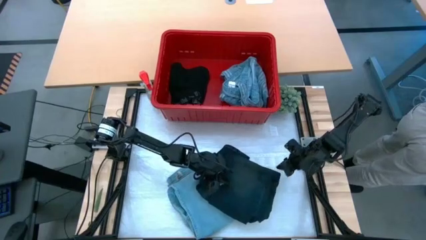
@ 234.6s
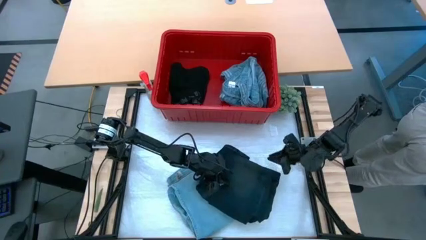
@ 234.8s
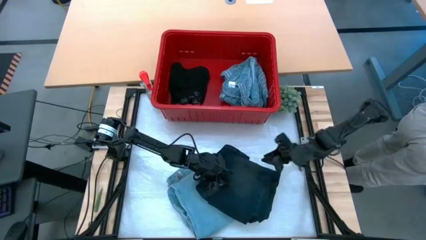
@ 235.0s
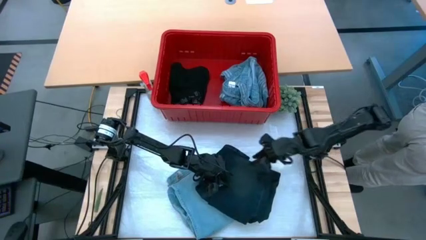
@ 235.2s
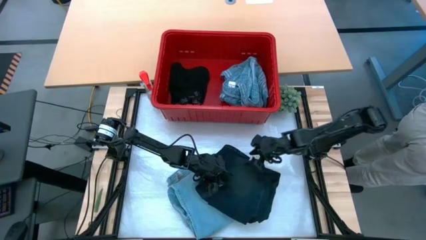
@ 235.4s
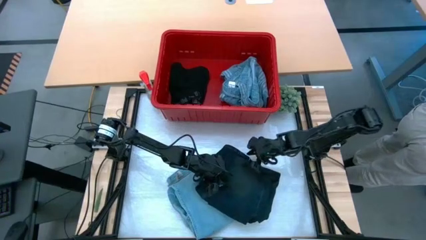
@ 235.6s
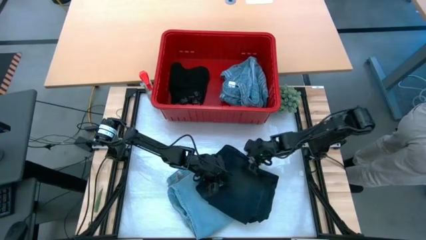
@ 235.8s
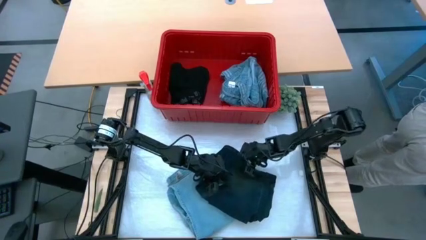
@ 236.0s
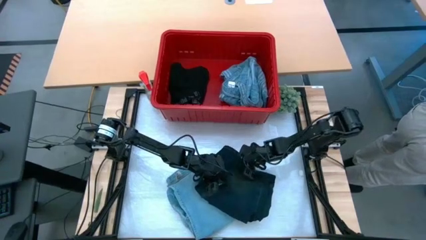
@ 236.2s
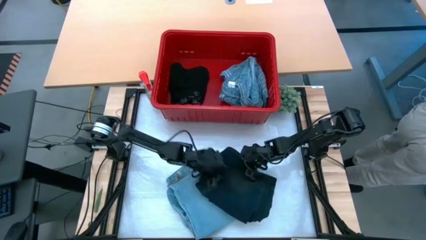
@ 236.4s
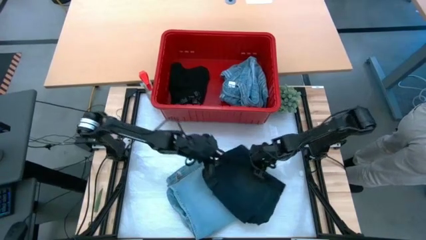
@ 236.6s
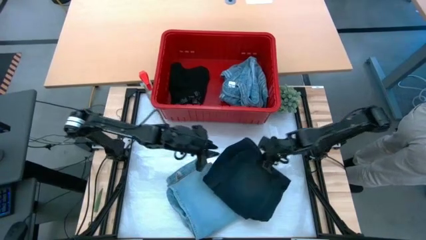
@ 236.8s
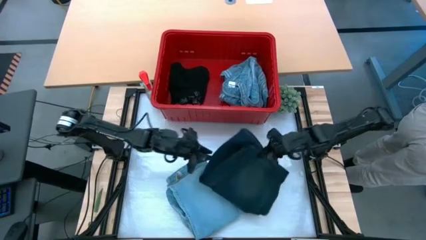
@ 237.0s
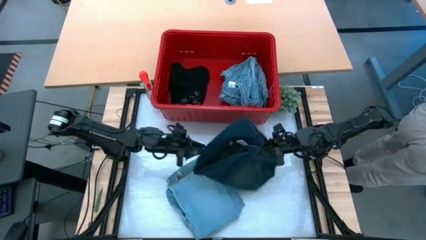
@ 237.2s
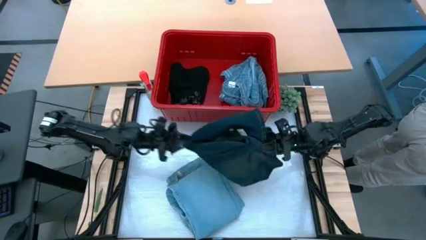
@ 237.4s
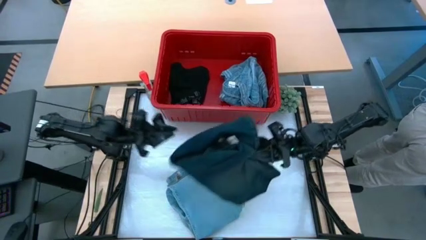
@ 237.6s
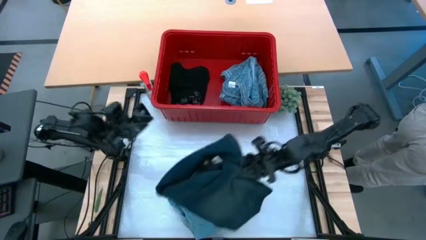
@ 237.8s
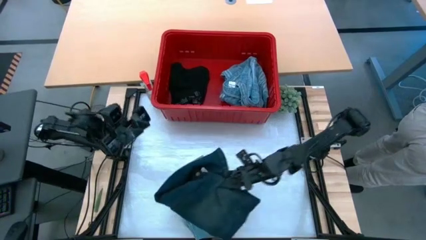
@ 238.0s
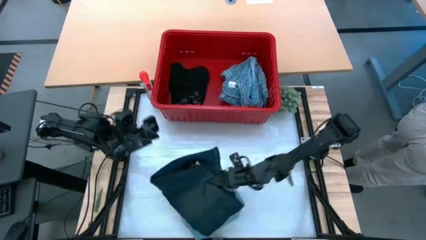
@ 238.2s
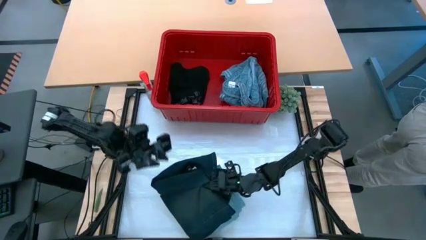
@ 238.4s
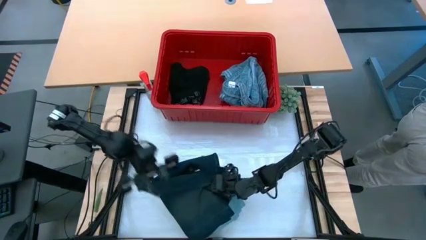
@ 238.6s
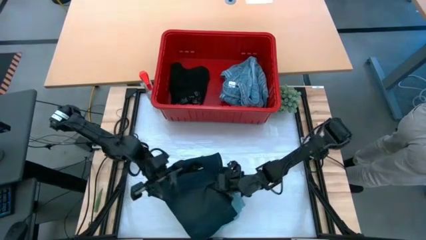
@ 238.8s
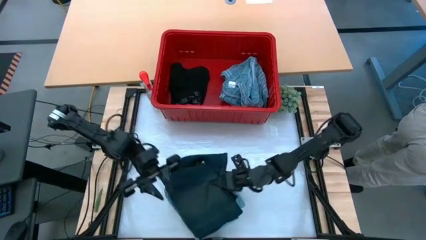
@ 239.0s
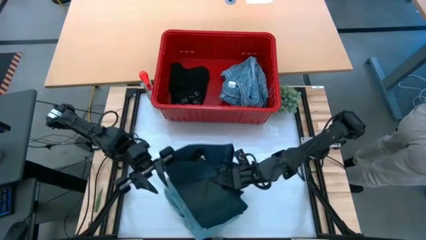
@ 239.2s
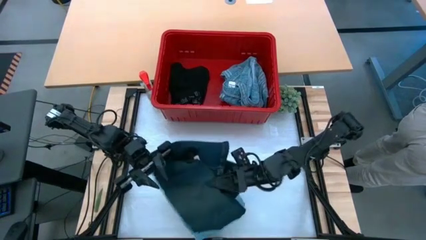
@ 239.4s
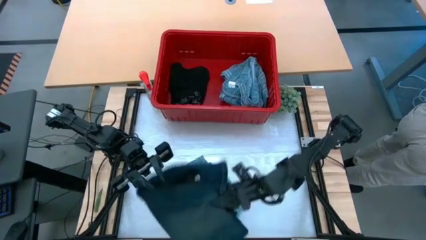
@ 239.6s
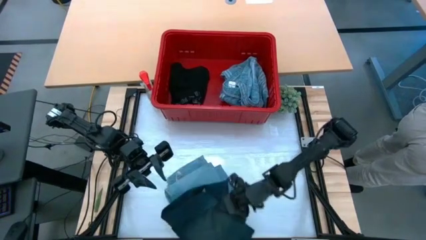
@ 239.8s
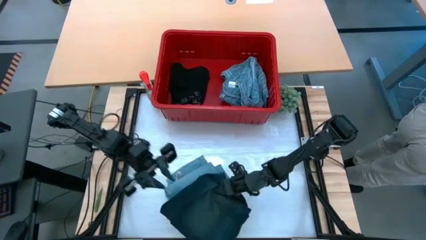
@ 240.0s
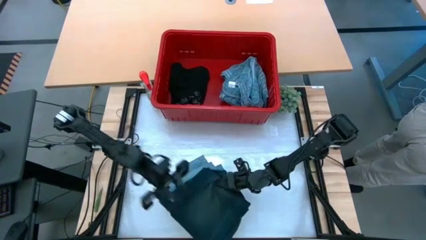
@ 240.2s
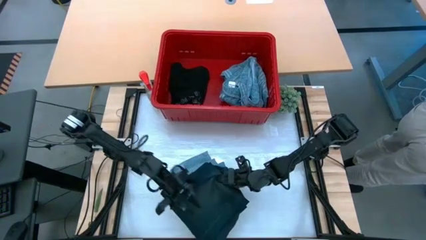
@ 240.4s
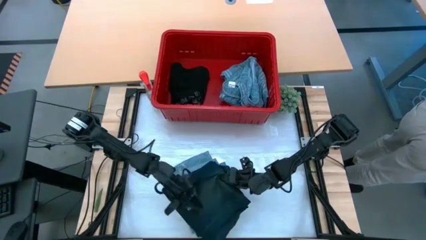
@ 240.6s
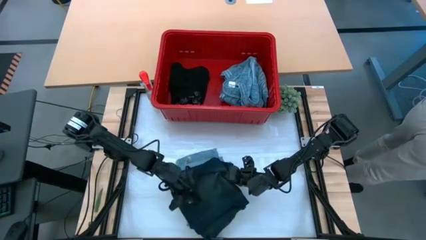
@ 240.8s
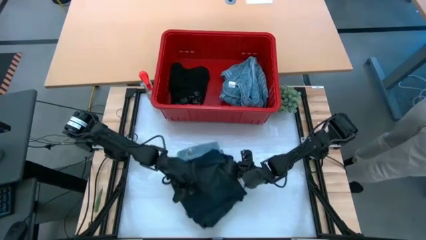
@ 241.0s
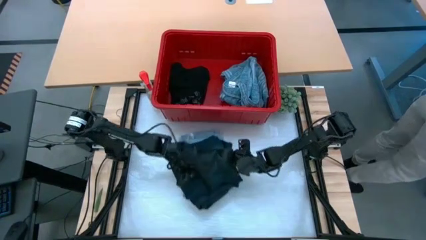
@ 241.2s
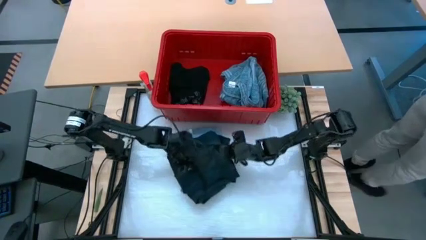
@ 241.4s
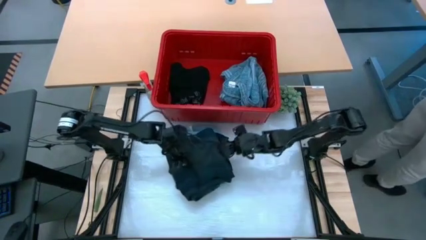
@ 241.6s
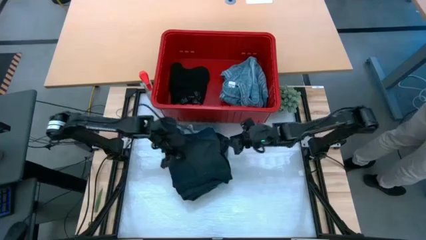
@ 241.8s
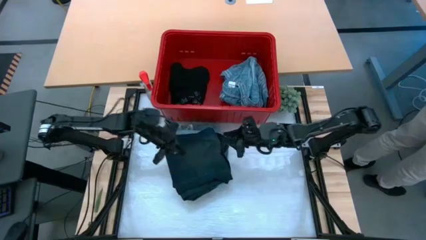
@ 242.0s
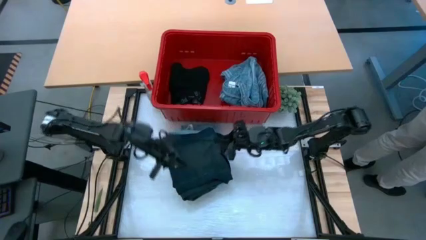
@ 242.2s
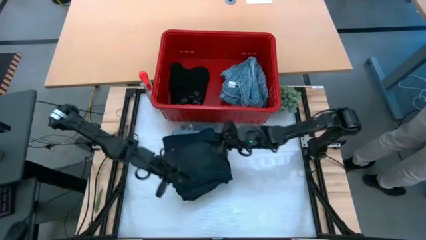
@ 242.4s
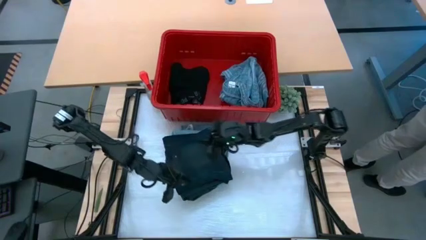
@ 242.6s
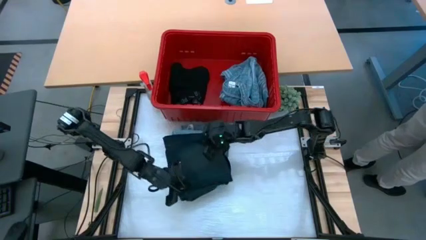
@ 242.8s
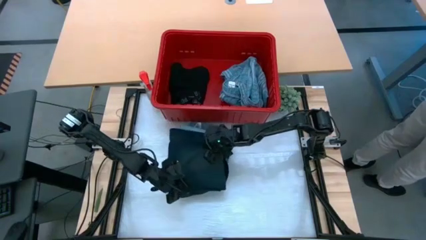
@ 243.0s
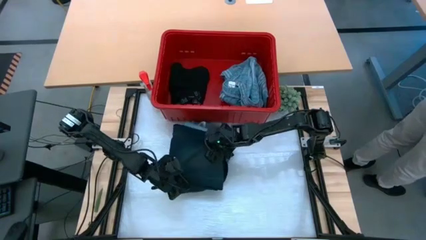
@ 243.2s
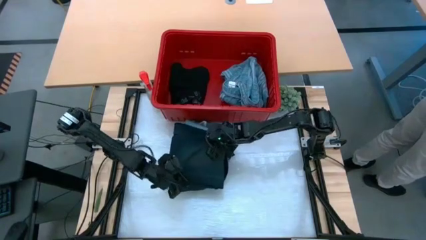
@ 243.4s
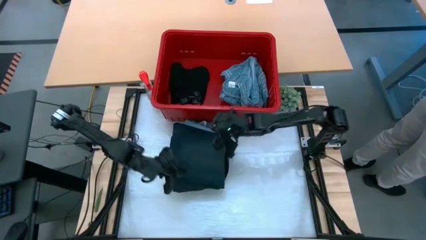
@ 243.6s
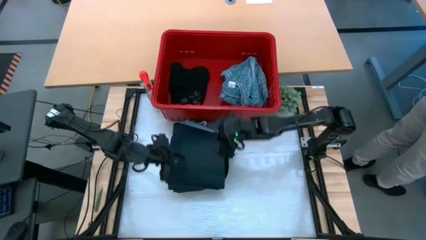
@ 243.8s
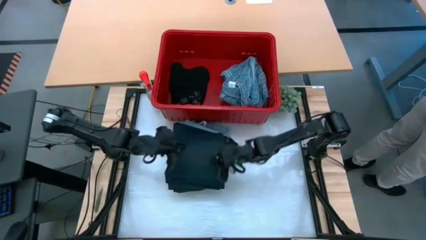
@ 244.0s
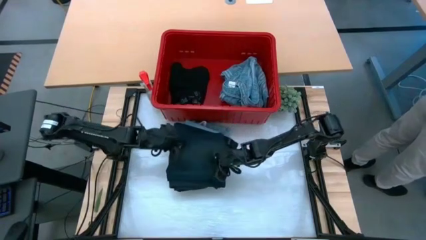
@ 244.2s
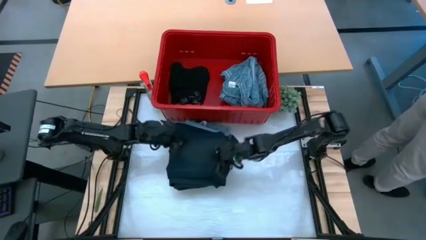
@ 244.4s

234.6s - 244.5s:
Task: Fold Laundry from Bin
Stack the dark blue pants on top of the light blue pants

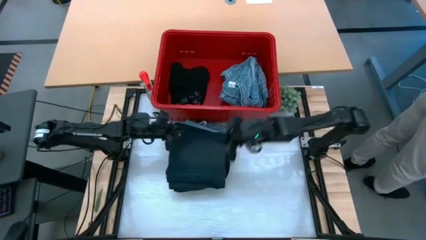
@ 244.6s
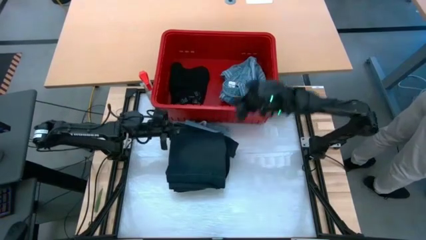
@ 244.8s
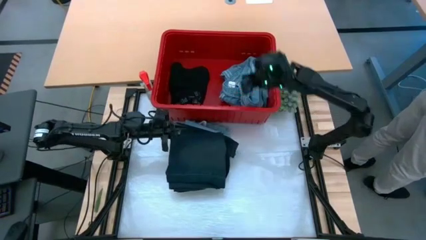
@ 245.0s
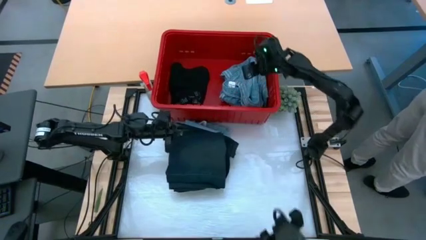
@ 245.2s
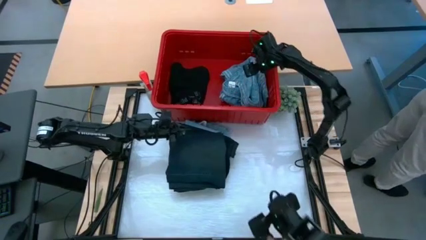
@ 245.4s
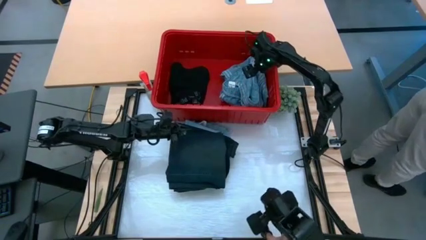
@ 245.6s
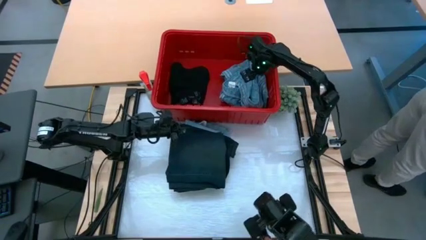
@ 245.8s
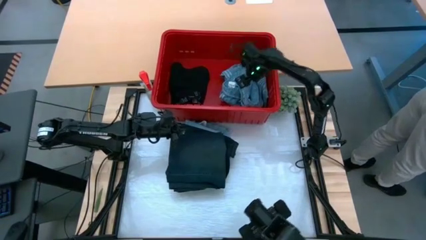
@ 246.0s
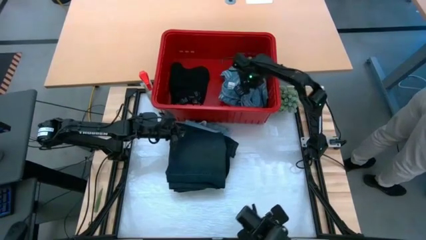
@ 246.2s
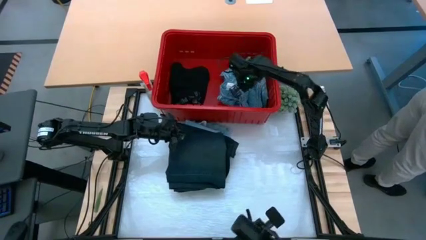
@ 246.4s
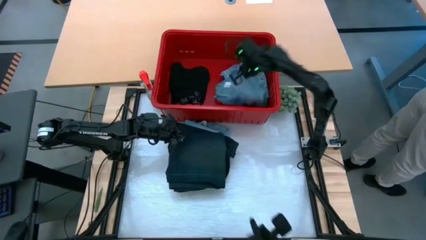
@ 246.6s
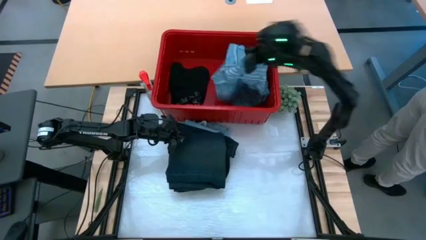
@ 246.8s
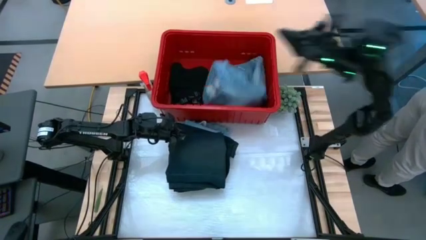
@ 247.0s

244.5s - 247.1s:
Remove the blue and white shirt from the red laundry bin

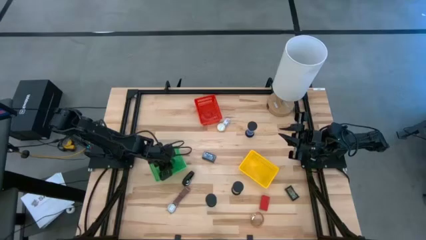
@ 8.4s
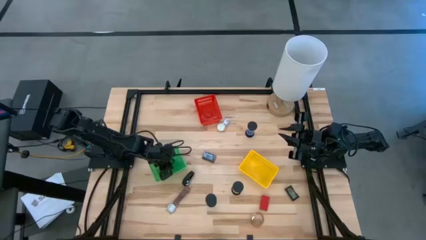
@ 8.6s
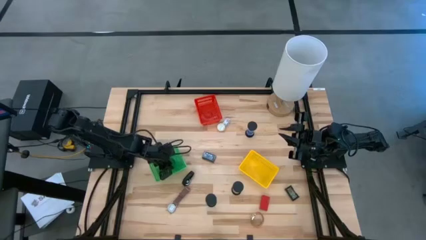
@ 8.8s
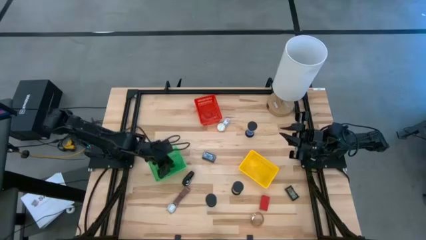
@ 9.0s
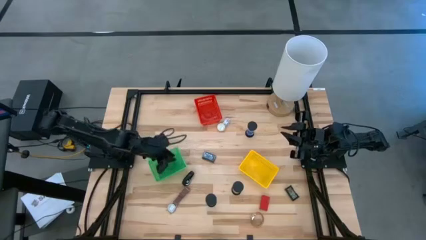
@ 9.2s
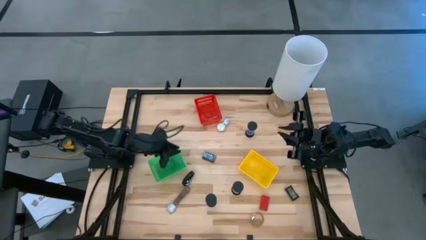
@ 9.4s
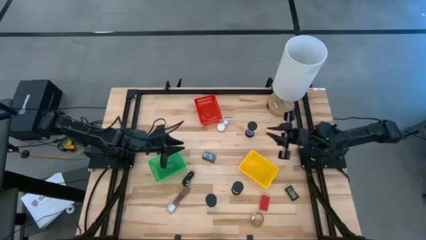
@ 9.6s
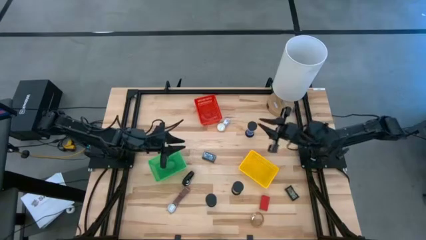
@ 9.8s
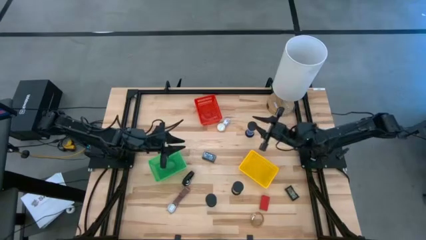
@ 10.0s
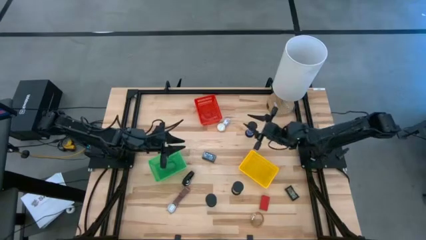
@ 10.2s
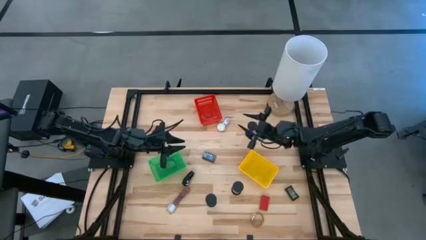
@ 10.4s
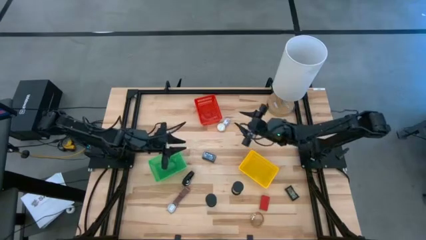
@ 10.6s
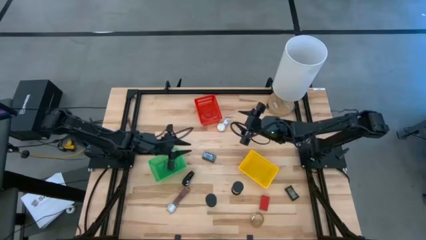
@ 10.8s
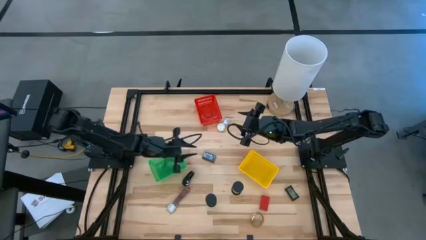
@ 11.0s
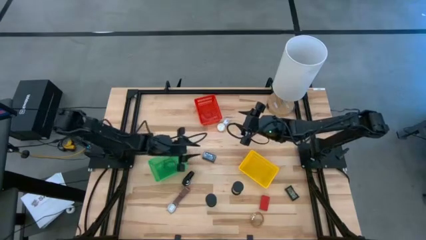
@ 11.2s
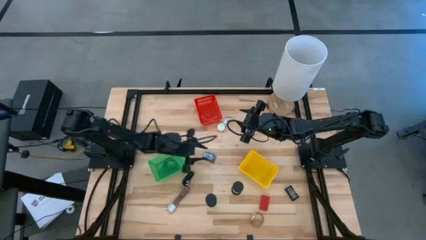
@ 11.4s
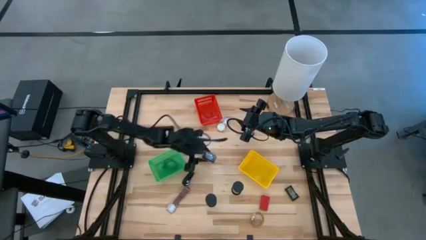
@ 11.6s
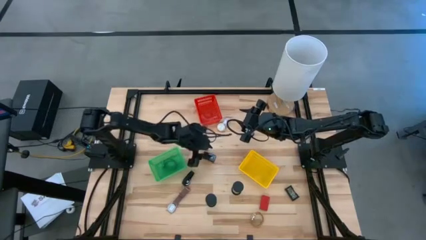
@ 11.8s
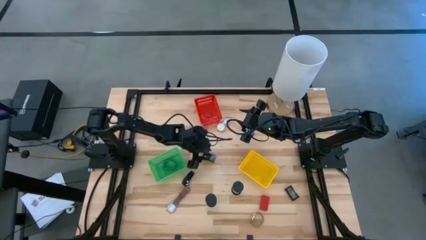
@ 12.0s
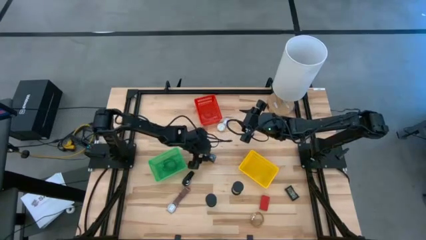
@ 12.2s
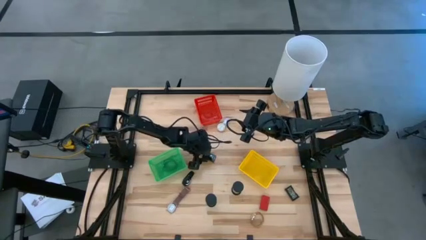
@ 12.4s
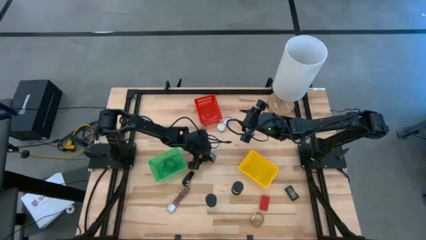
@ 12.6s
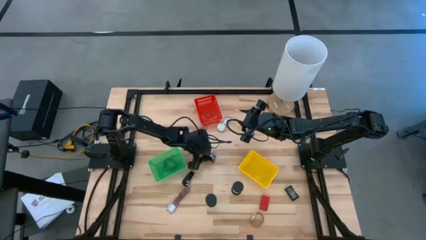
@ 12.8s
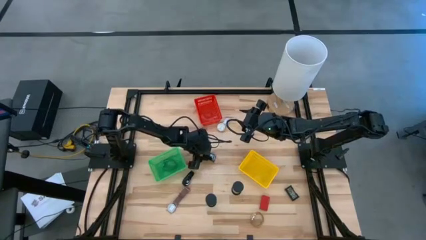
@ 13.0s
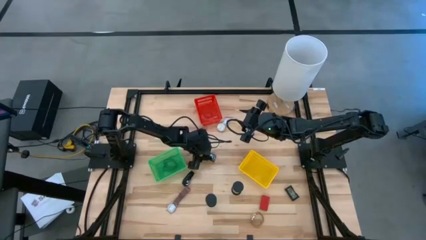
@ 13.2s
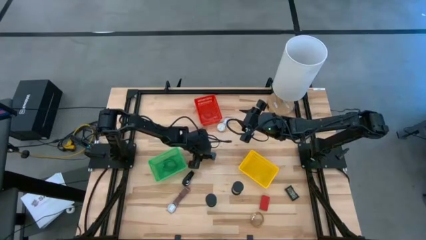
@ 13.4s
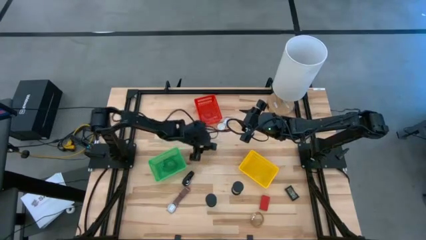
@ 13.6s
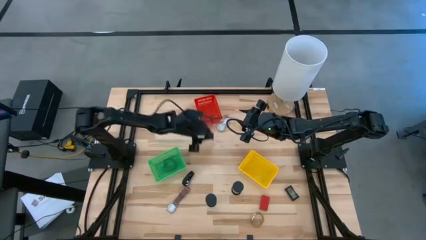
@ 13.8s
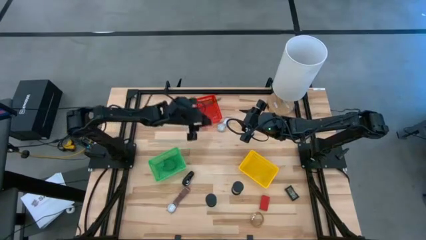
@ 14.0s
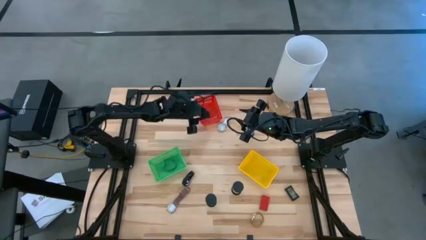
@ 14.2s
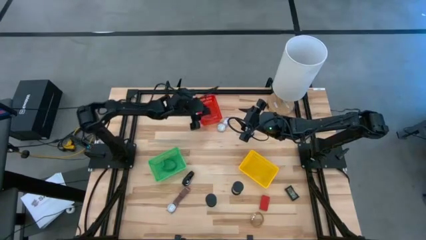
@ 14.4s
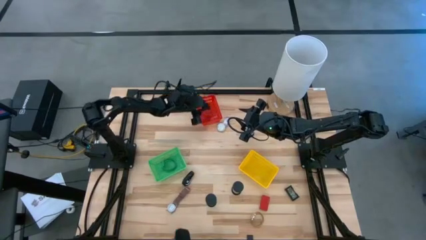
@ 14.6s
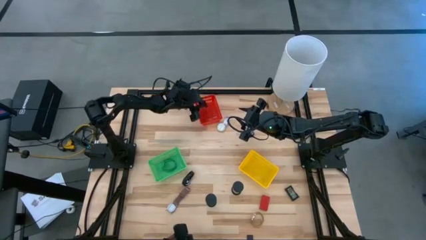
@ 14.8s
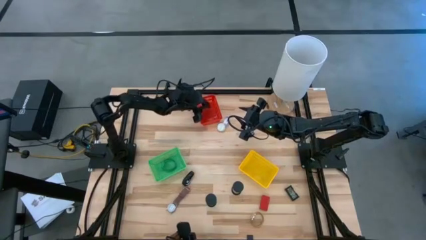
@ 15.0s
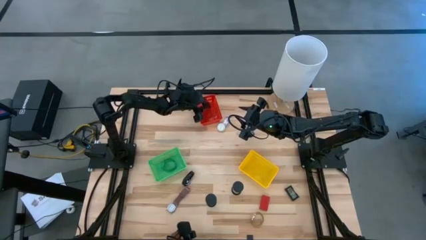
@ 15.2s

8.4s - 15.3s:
Task: Pick & Place Office items
Put the top black digital clock into the red bin
